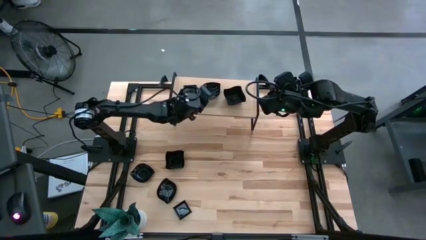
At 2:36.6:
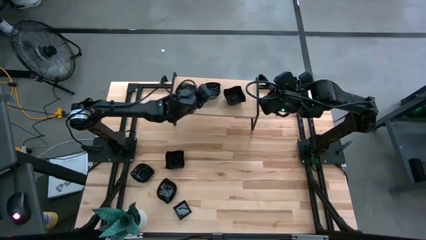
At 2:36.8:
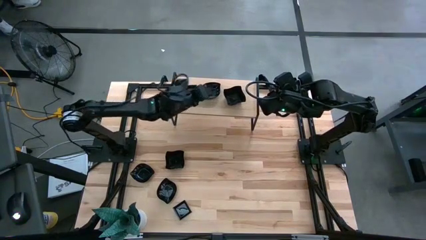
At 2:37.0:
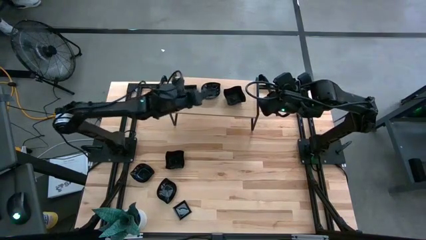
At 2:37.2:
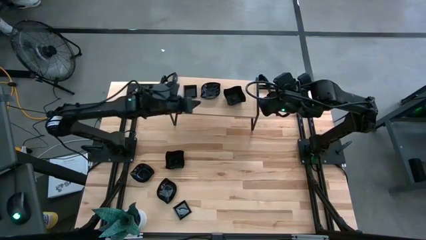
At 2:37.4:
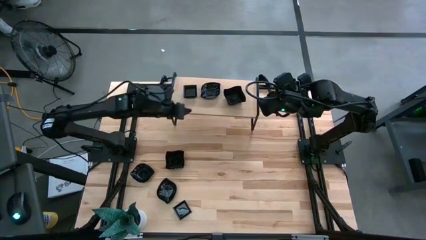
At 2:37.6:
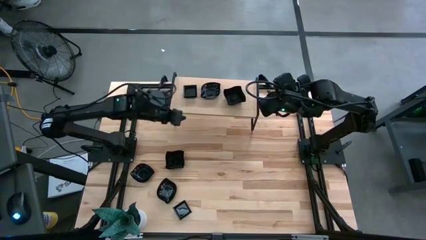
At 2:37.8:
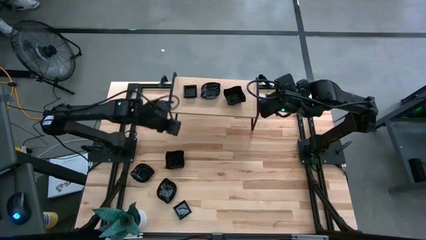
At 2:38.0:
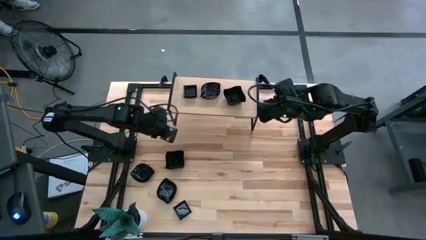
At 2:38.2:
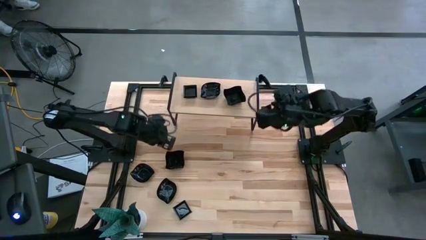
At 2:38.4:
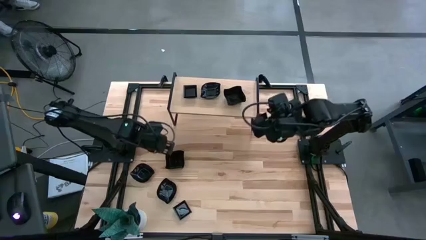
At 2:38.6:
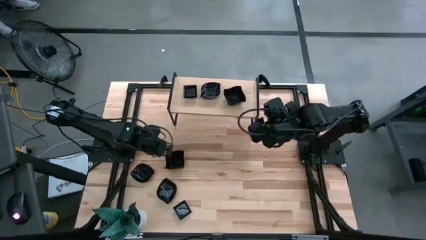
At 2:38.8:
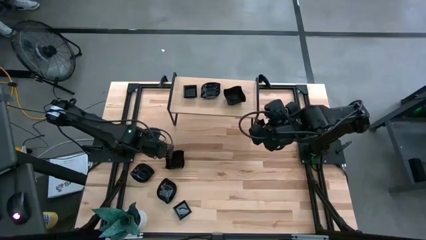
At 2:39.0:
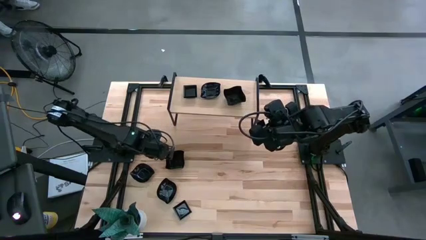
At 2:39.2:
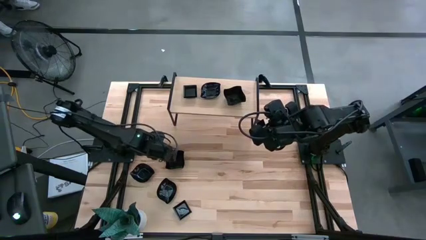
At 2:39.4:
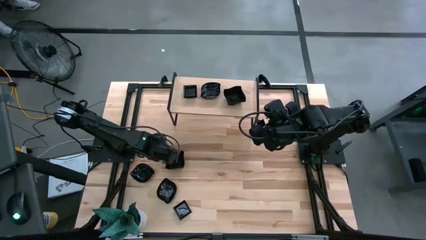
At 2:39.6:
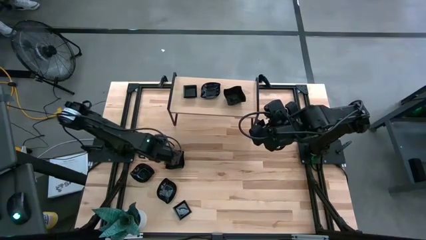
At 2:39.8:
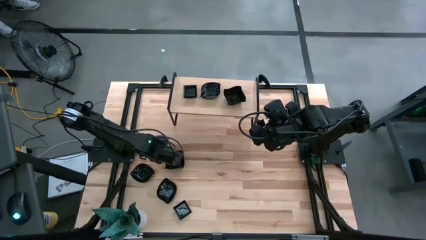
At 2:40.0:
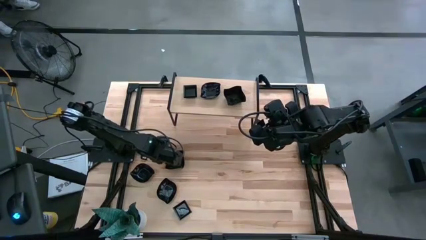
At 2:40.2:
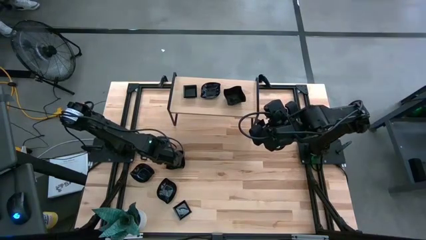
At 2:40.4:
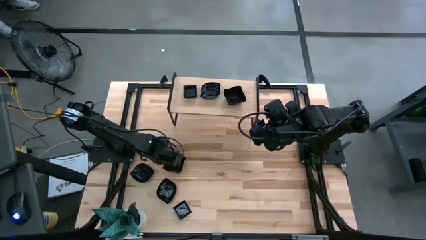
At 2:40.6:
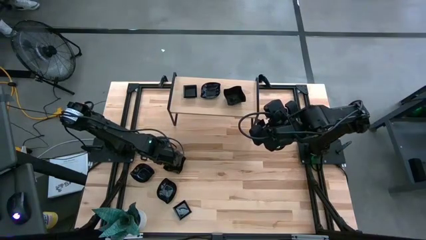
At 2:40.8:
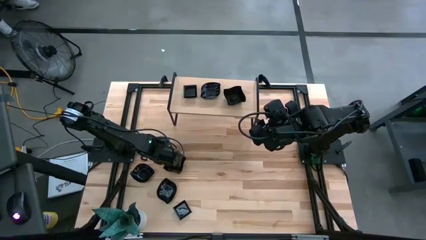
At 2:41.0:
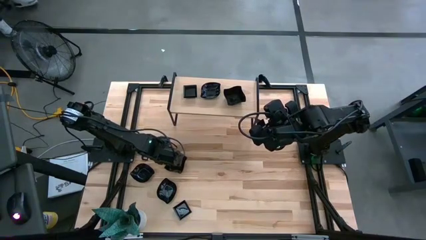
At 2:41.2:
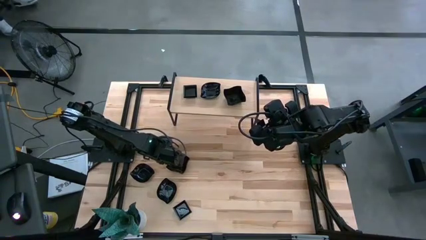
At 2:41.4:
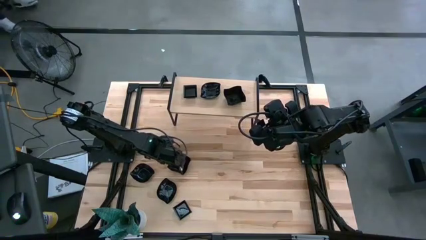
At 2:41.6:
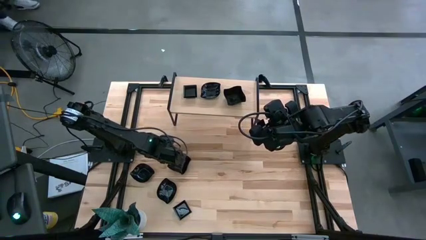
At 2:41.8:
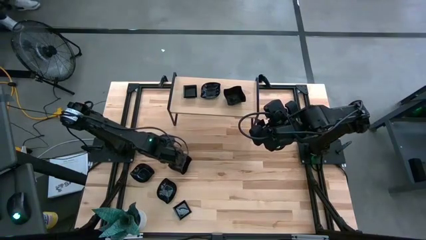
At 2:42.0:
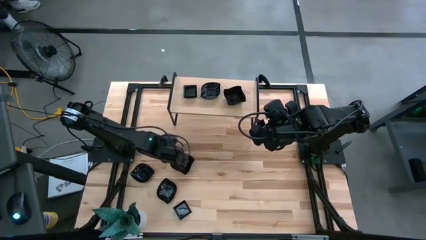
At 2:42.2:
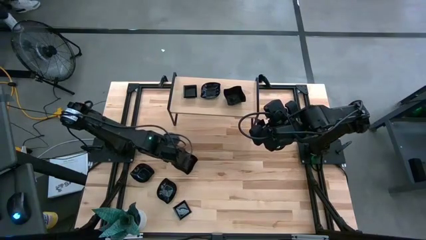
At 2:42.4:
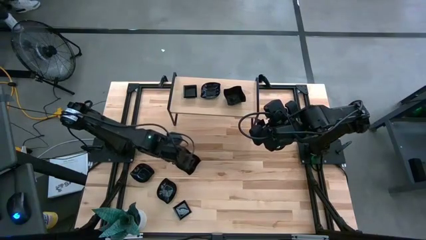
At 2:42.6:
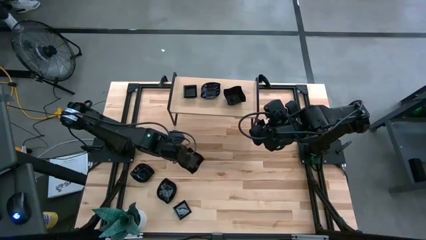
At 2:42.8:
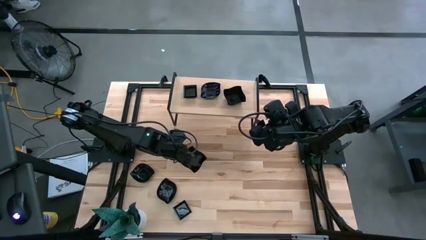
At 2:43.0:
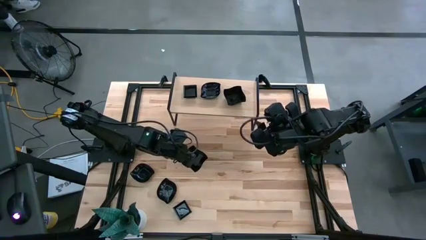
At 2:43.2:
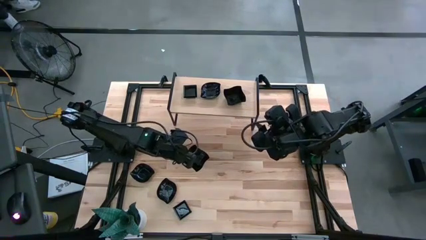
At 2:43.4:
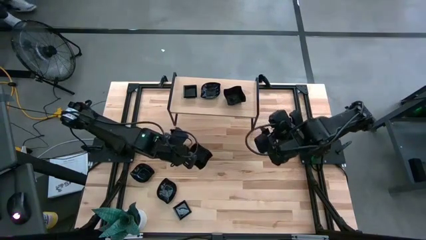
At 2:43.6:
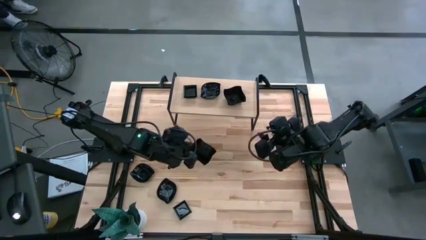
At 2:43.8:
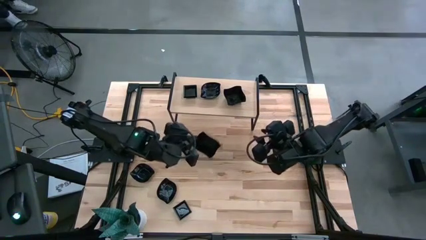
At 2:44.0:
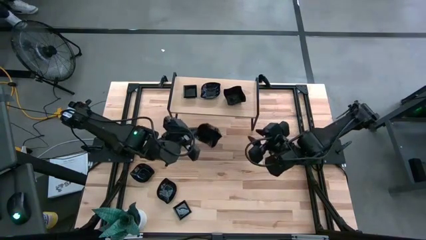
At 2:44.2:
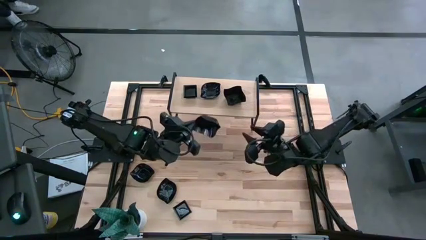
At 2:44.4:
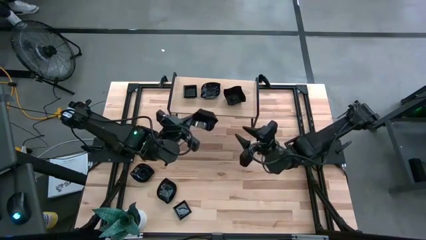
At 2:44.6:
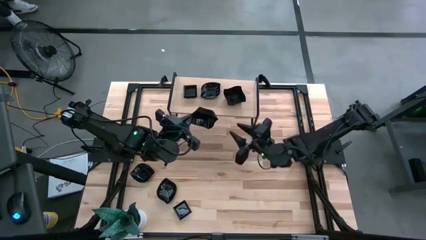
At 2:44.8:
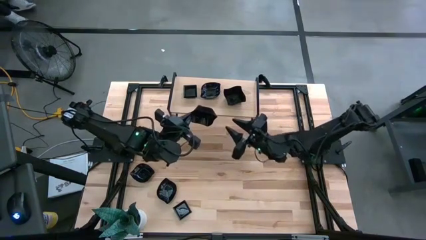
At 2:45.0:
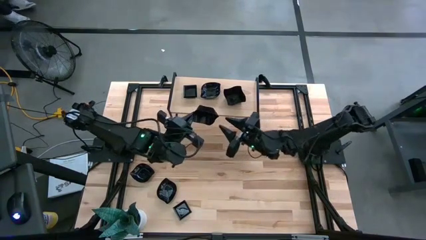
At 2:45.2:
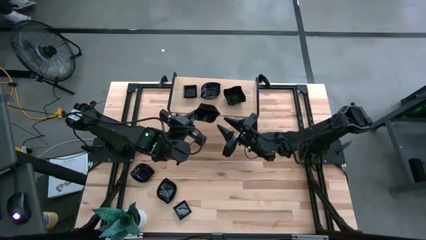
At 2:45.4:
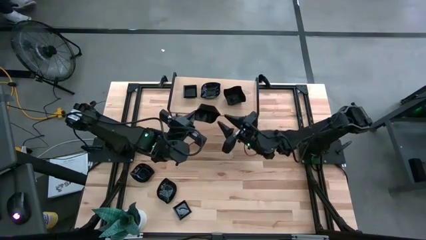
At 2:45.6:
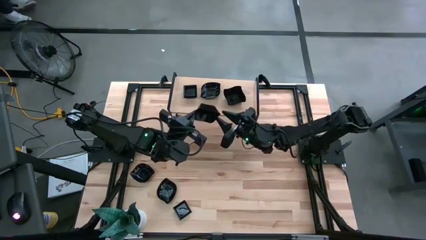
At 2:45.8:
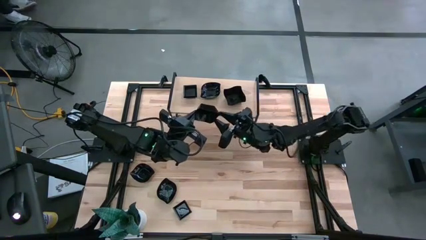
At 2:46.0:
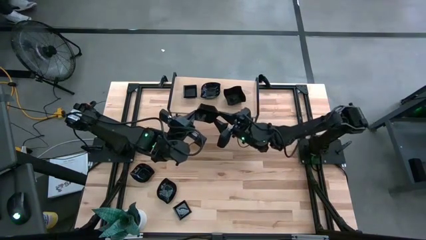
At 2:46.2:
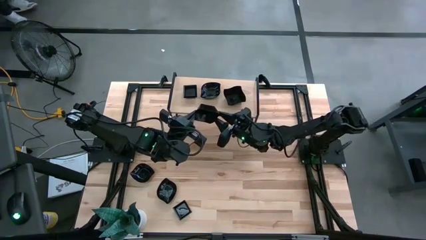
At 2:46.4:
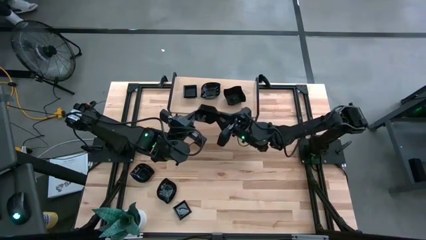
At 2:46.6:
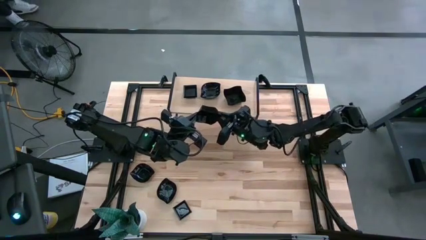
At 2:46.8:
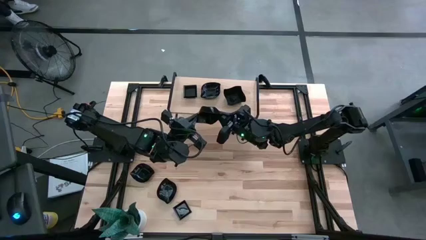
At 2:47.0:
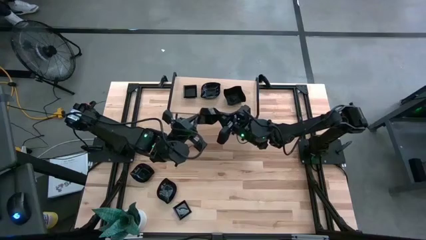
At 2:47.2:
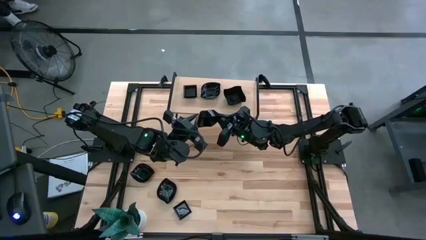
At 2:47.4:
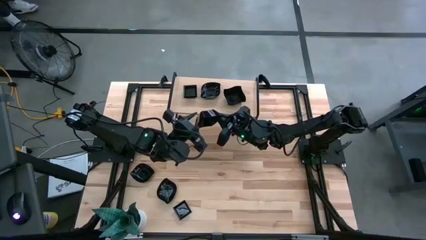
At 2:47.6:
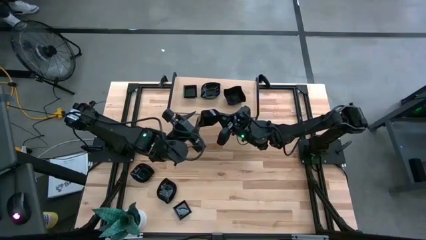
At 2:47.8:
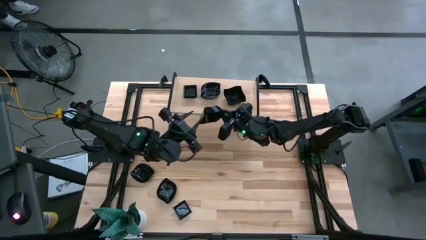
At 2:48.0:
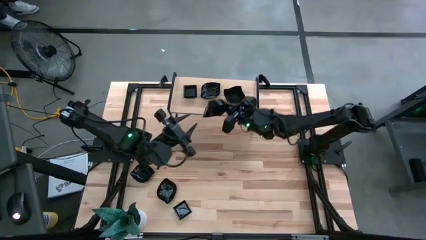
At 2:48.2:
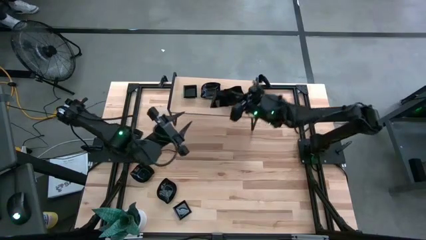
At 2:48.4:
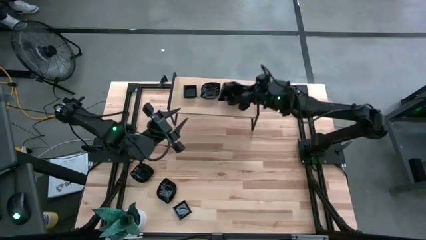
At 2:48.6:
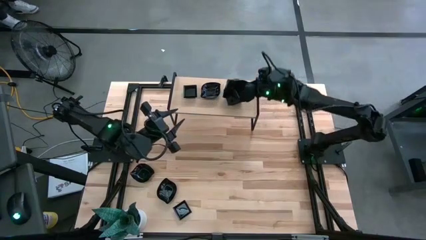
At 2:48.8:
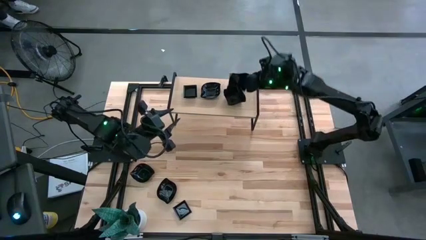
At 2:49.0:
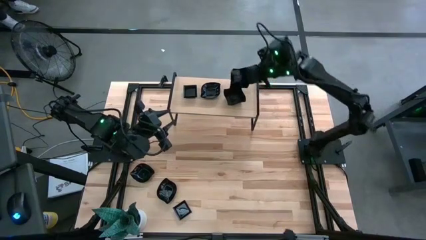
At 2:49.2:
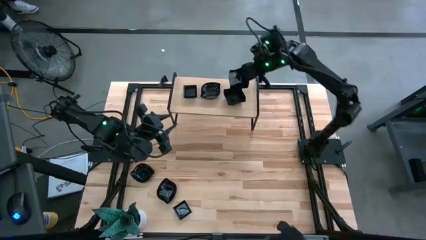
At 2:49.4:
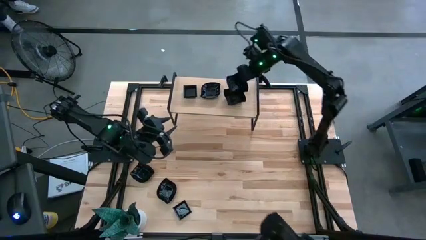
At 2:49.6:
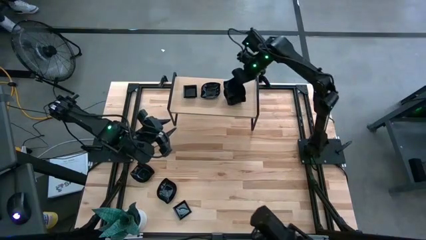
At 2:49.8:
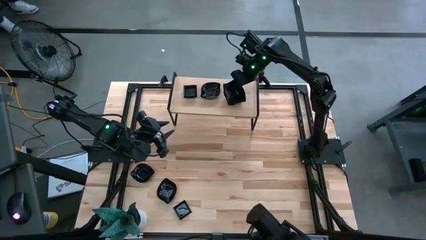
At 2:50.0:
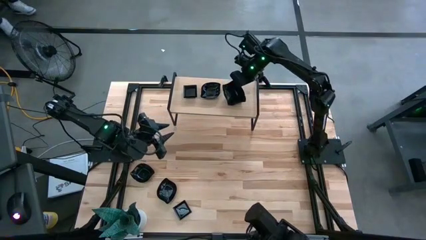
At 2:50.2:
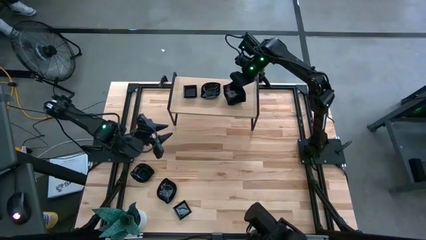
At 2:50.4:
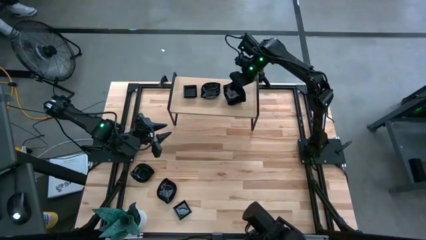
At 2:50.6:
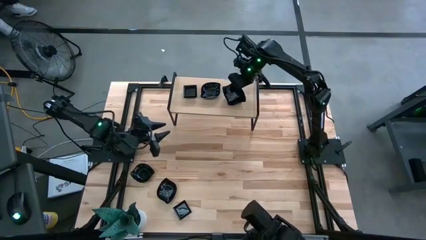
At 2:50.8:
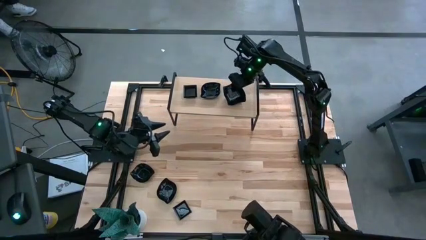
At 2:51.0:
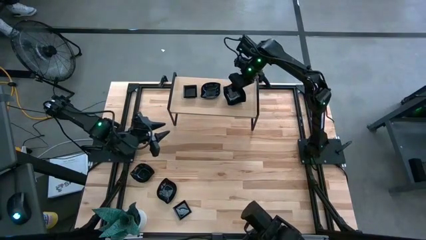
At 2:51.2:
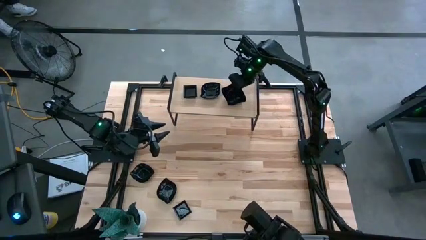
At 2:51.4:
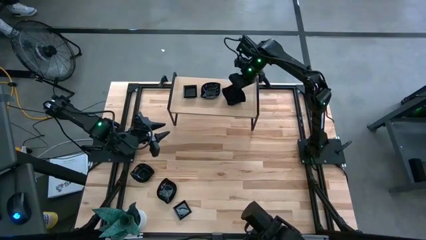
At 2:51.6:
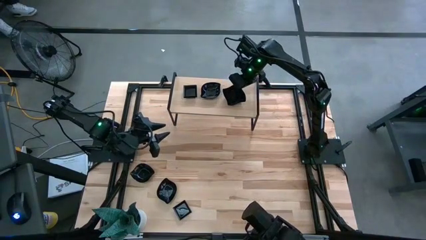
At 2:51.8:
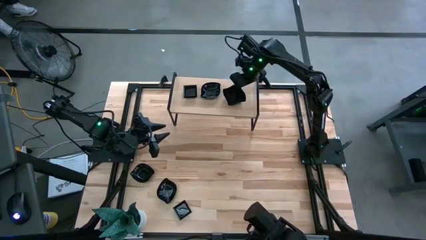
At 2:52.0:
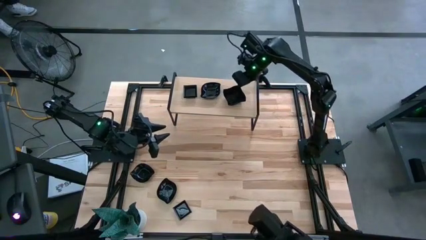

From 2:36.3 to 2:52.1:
Task: Pick & Place Mini shaped plates
Stack the distorted square-shaped plate on the distorted square-shaped plate
